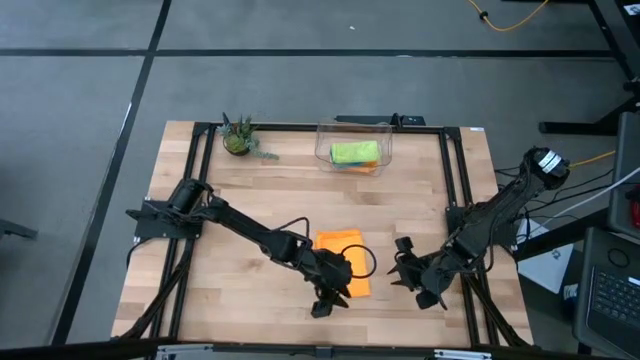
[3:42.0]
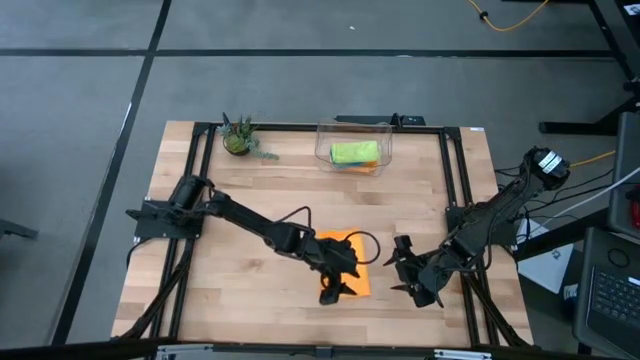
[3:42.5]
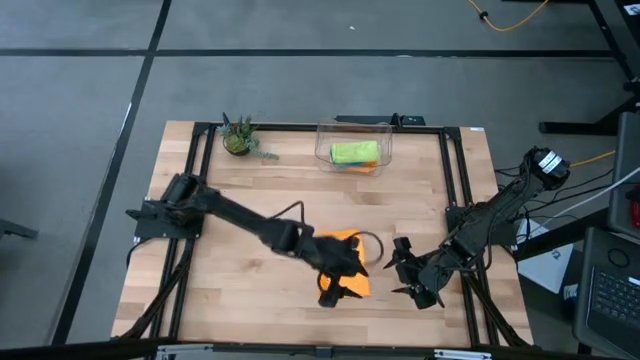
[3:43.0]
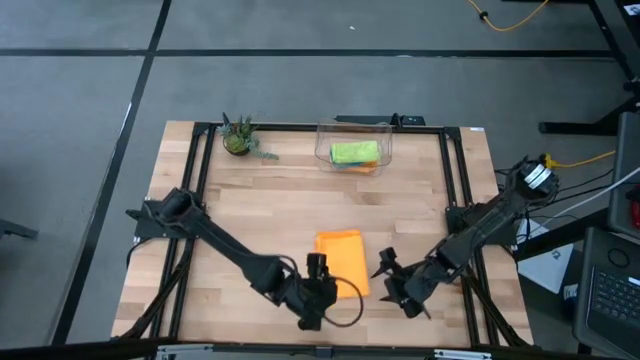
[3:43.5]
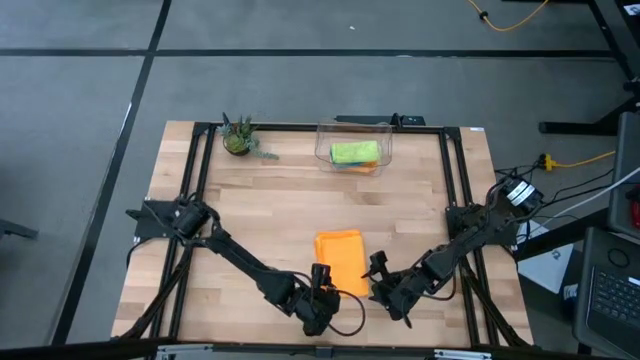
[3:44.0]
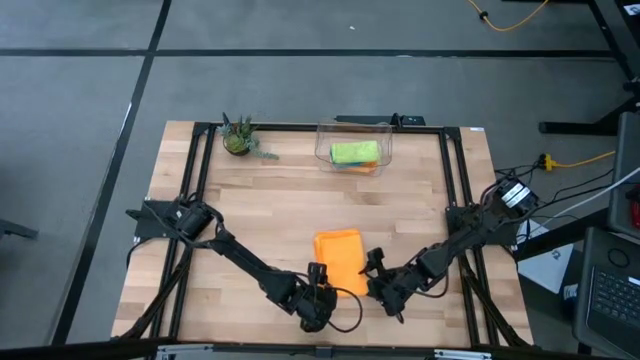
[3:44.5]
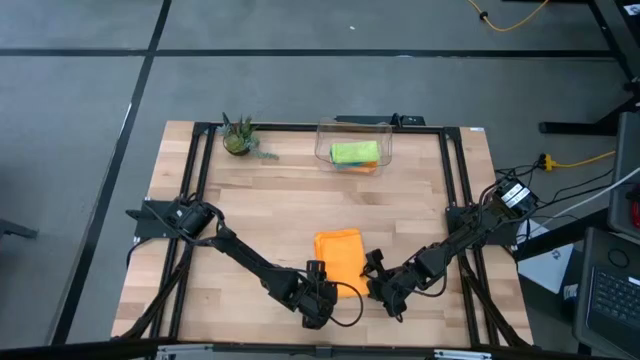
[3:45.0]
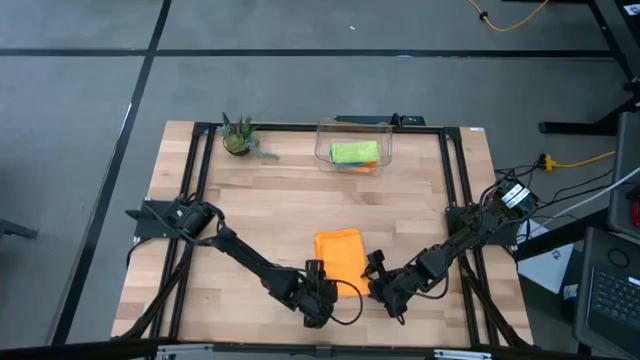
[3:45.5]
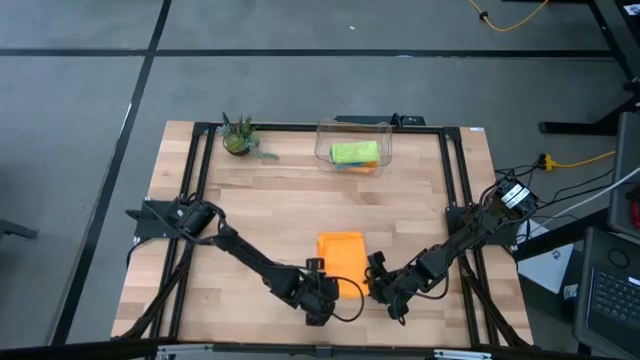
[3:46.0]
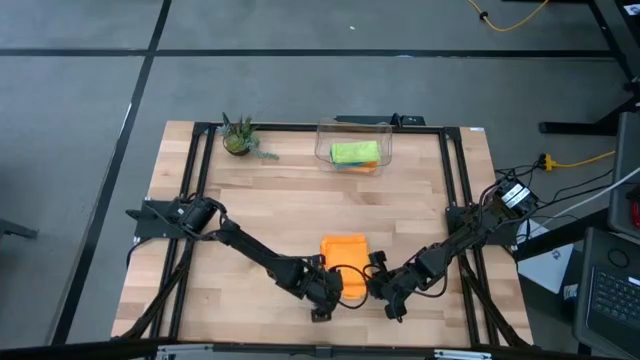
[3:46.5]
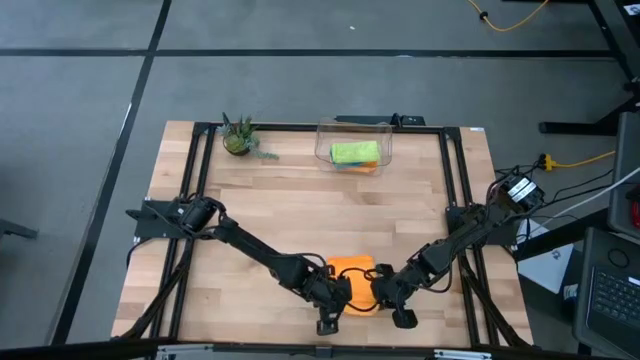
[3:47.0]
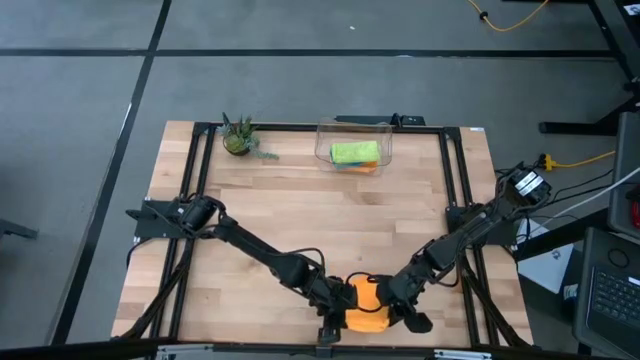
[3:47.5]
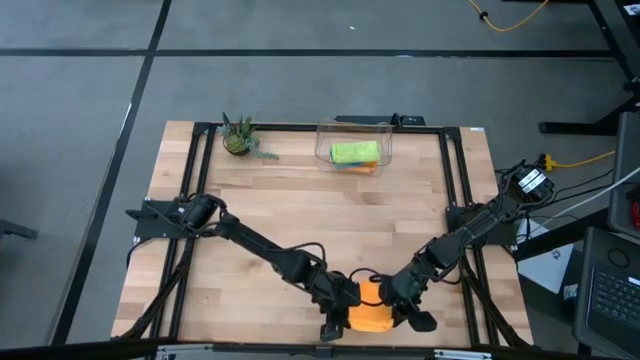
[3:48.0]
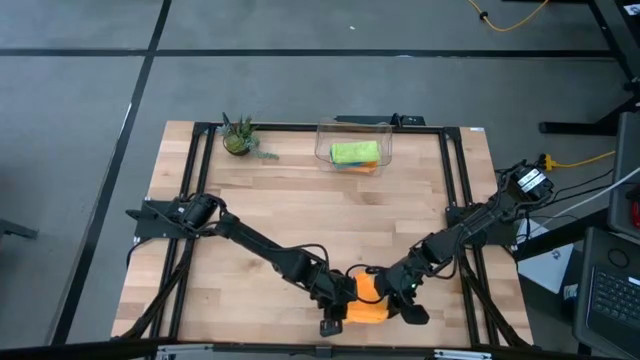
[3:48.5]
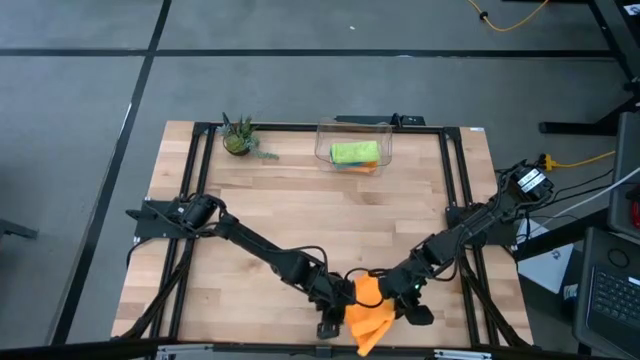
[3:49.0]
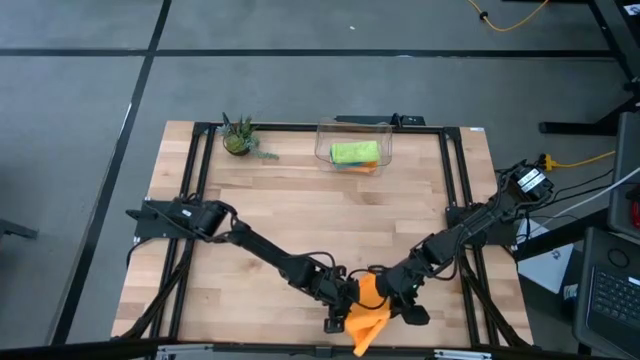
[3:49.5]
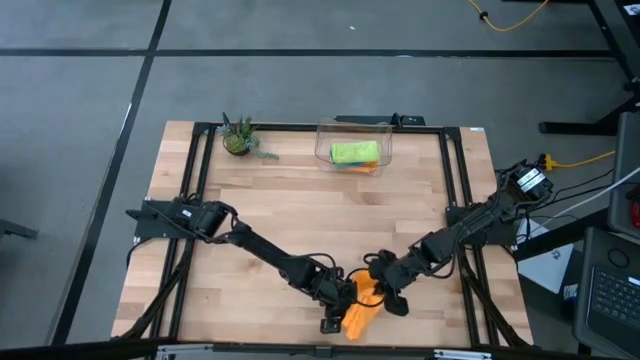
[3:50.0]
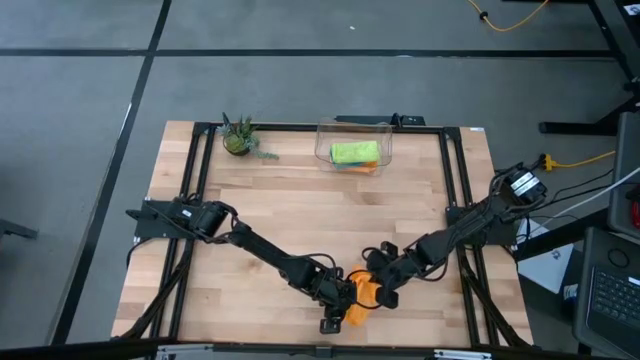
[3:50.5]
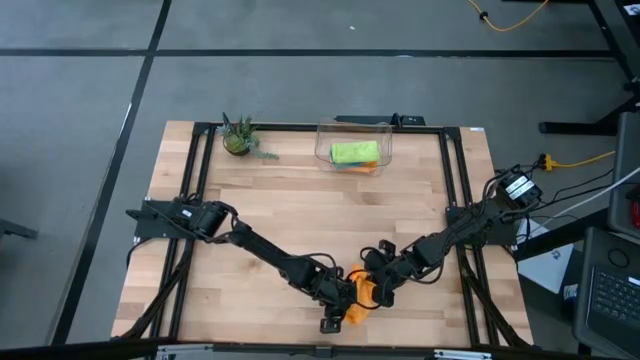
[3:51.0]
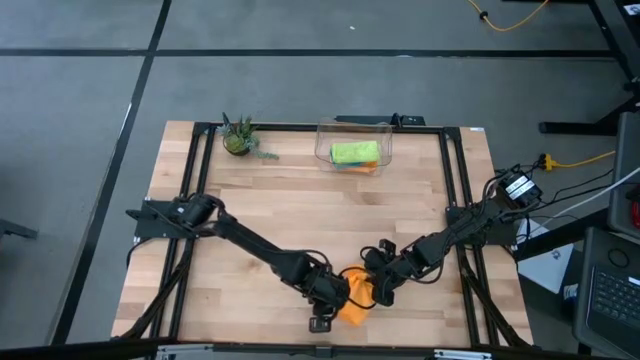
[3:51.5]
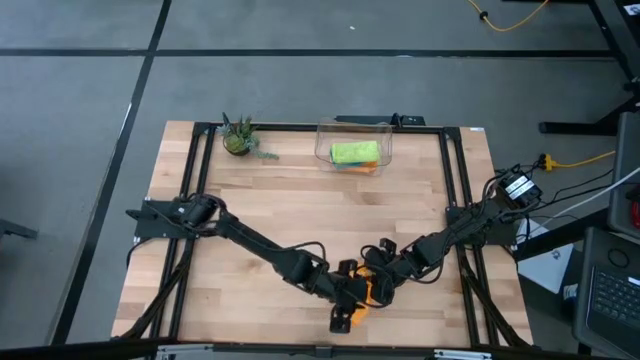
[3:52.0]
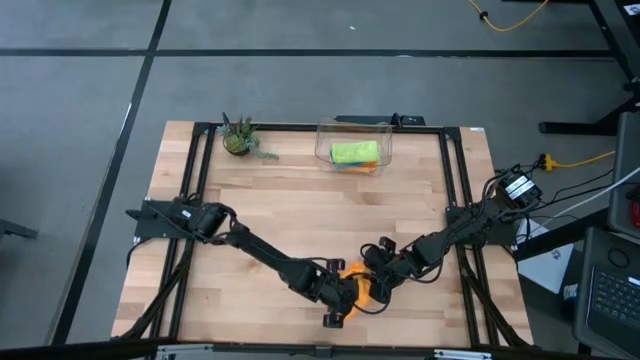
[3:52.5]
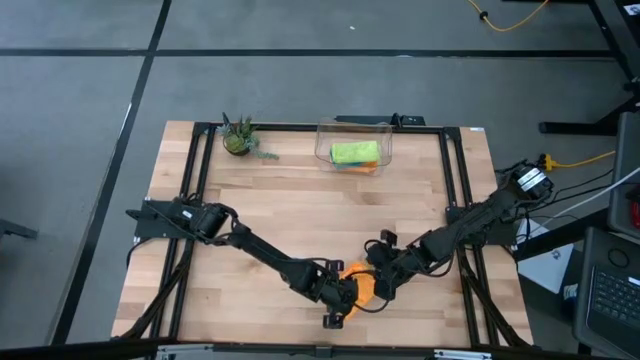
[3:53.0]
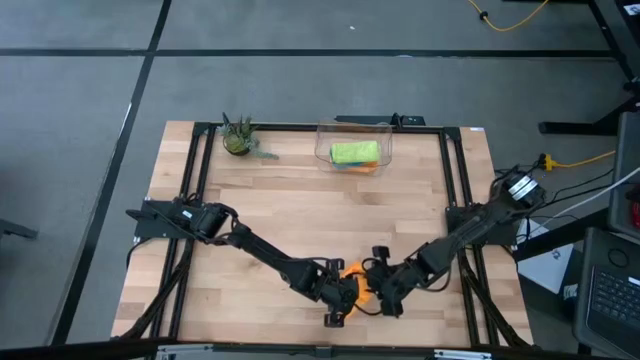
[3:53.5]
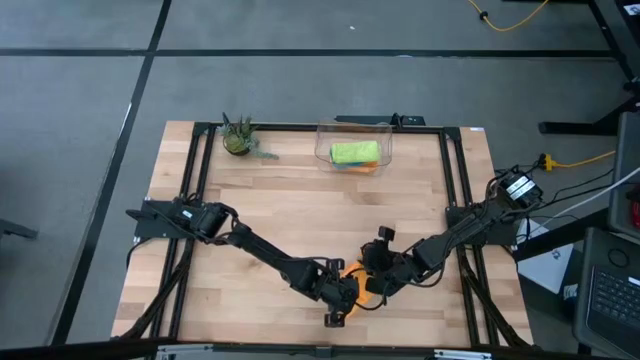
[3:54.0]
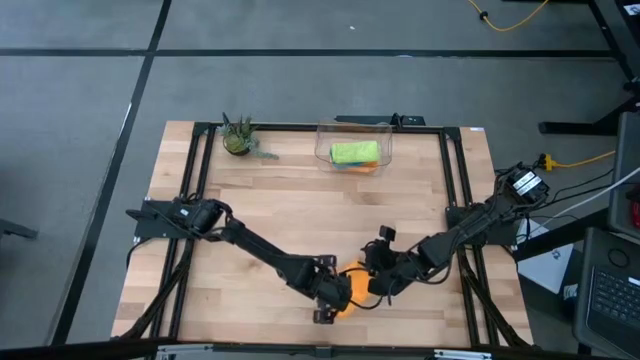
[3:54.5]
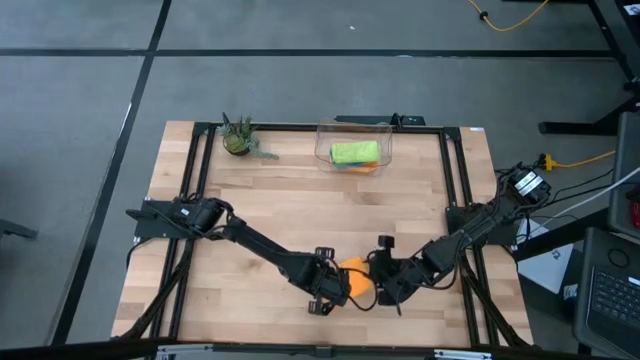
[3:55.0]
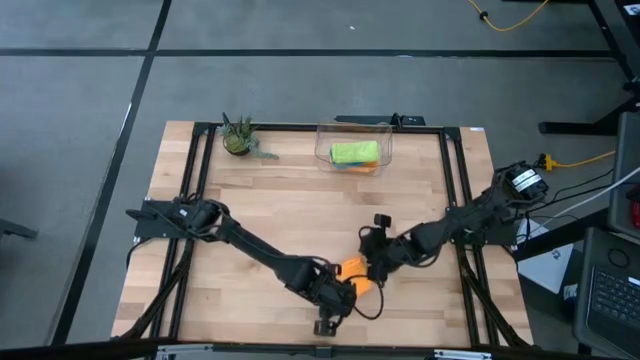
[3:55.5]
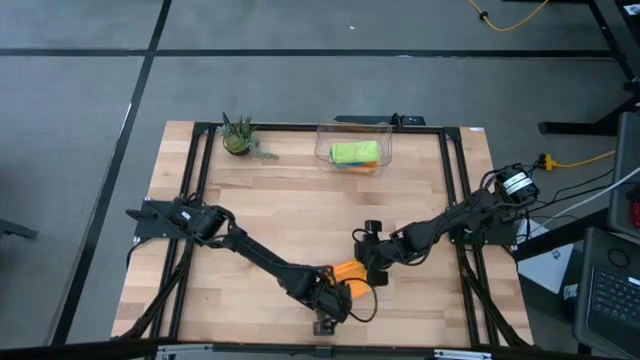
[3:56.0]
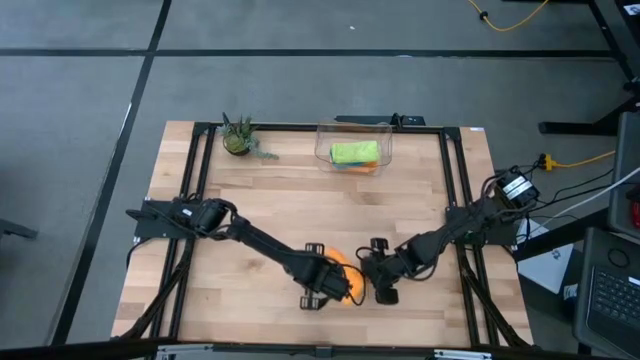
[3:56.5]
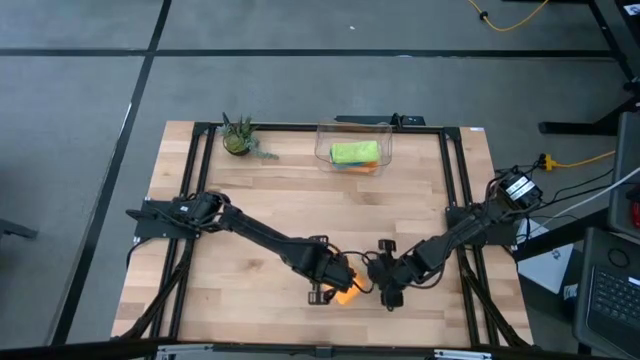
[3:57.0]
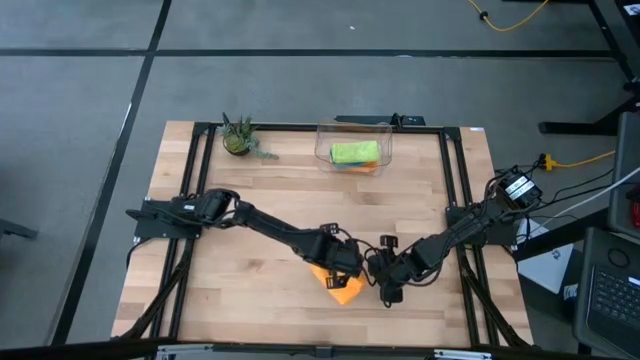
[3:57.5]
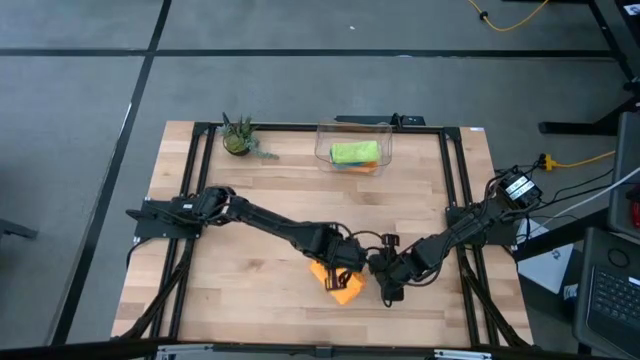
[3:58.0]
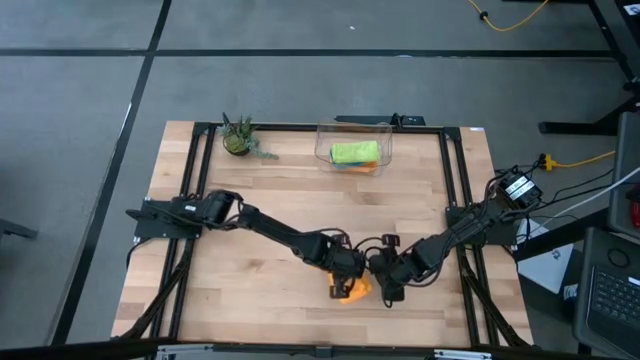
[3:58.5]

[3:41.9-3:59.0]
Task: Fold microfiber towels
Fold the orange towel on the table

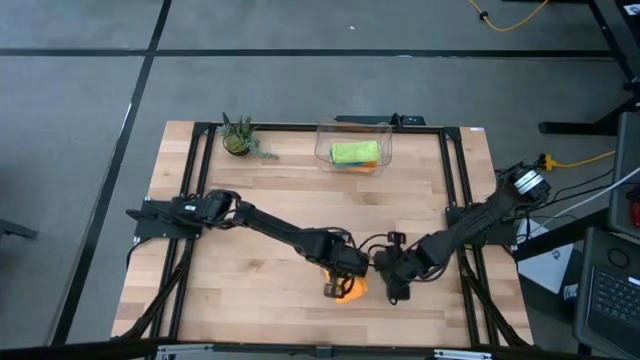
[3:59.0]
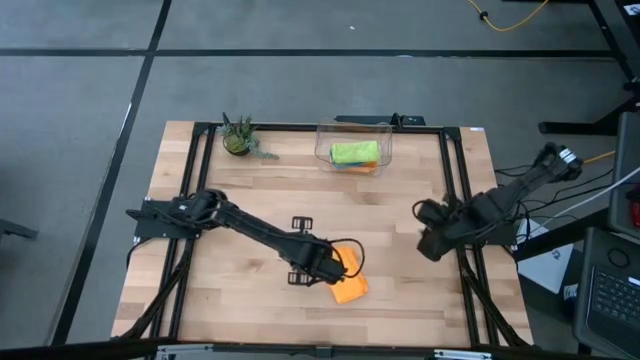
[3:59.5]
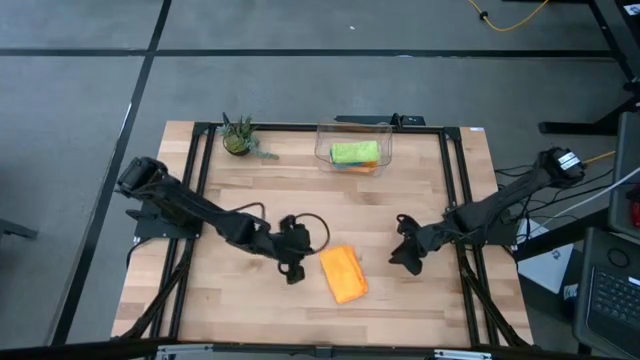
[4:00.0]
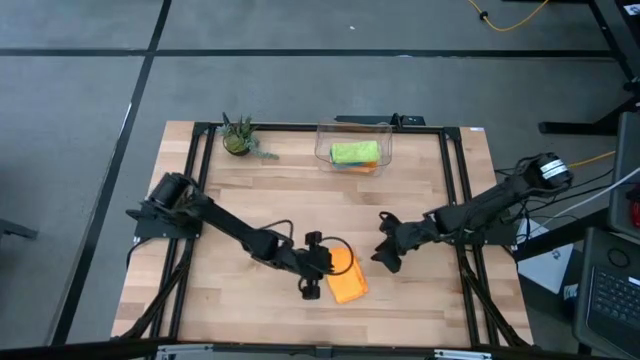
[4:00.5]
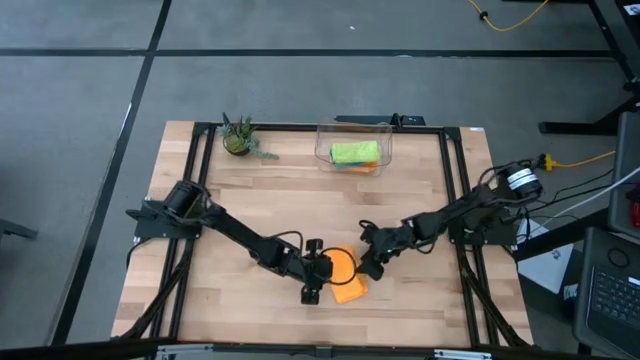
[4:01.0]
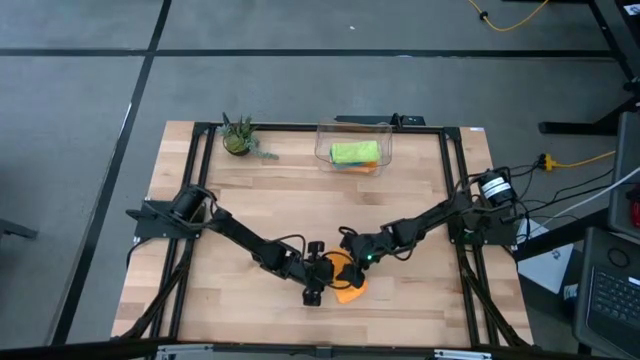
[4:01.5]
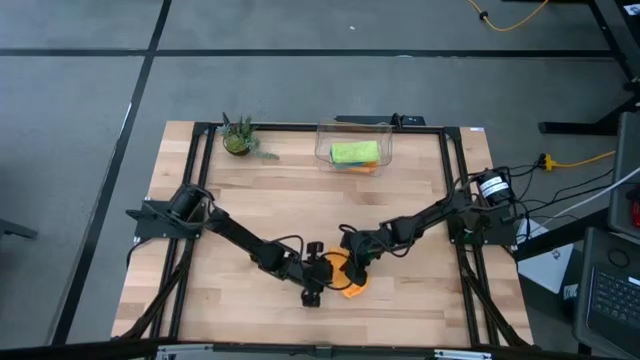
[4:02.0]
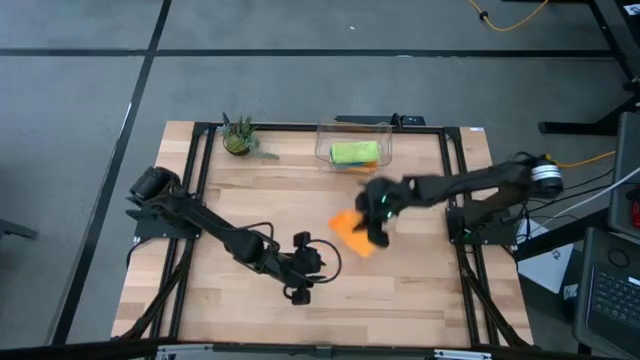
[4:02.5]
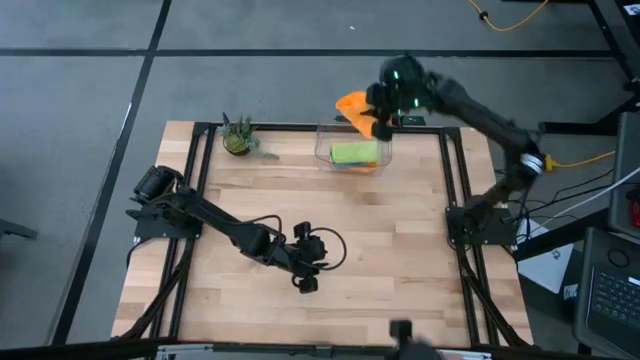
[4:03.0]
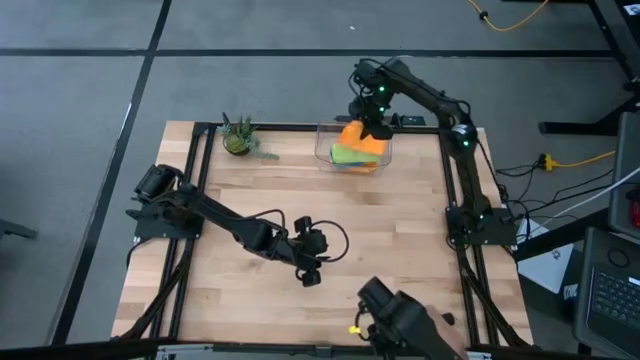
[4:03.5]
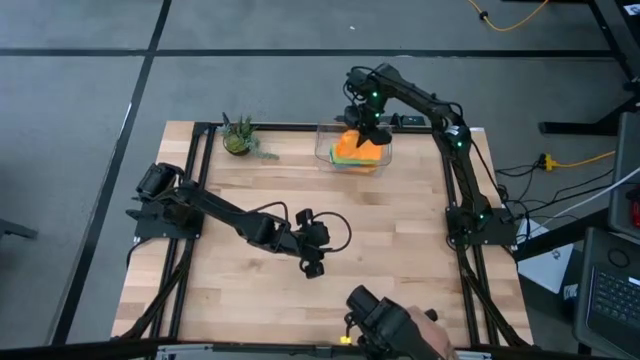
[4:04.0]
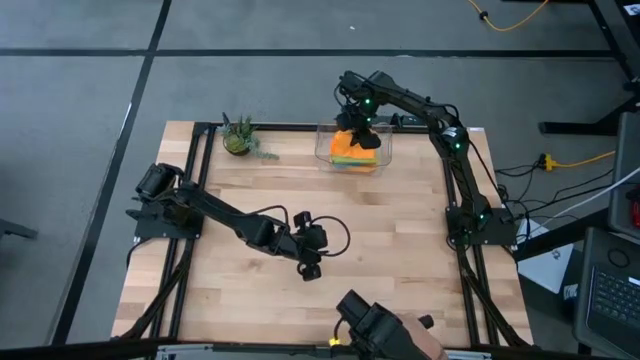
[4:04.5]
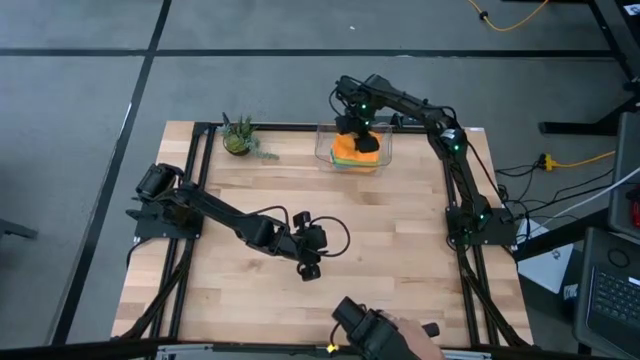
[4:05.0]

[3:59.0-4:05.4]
Put the orange towel into the transparent bin
